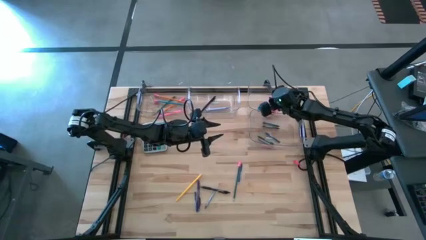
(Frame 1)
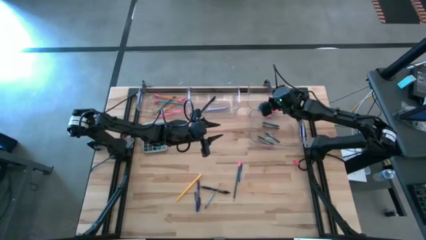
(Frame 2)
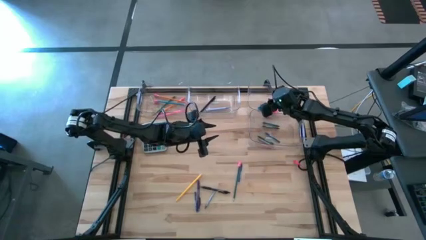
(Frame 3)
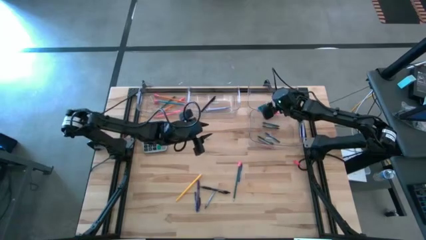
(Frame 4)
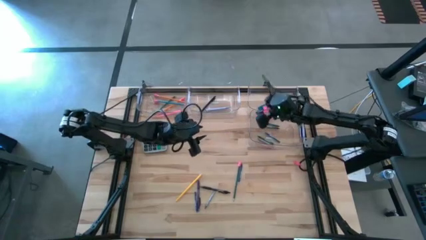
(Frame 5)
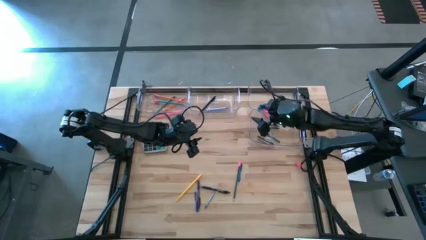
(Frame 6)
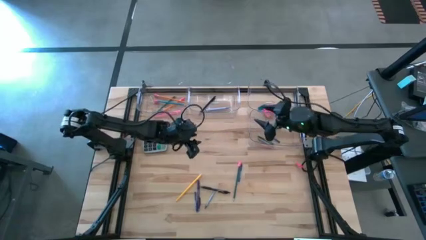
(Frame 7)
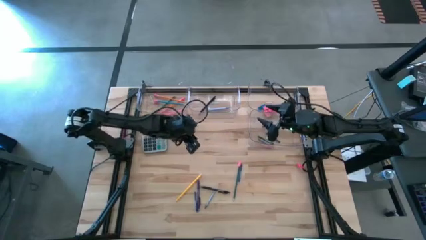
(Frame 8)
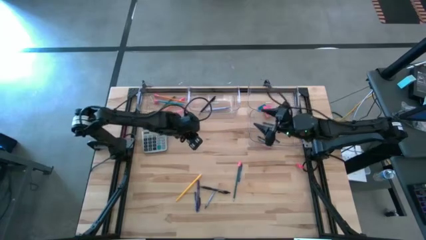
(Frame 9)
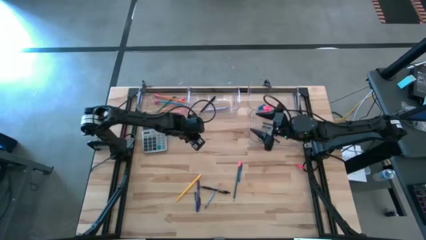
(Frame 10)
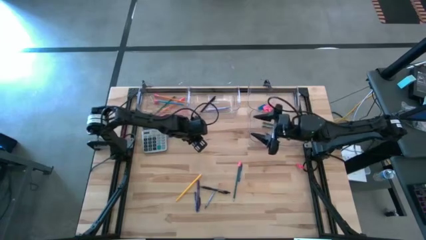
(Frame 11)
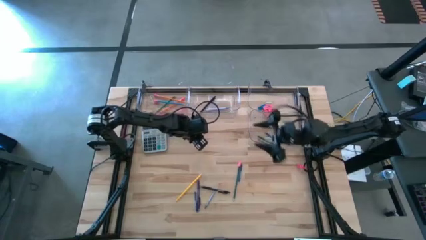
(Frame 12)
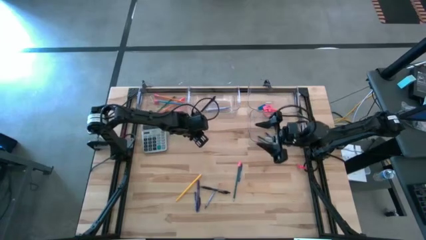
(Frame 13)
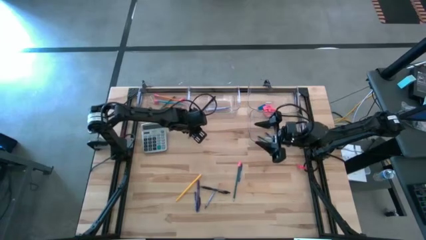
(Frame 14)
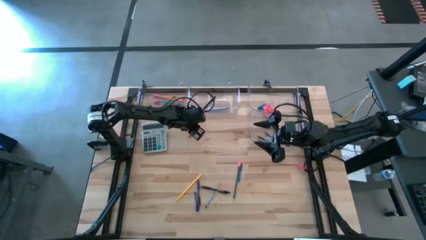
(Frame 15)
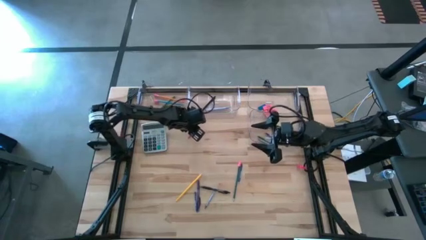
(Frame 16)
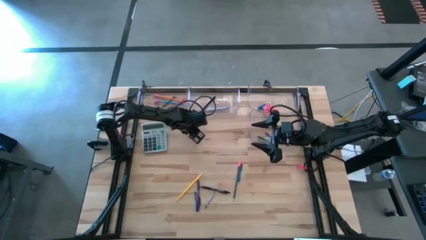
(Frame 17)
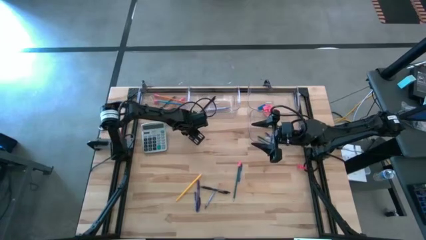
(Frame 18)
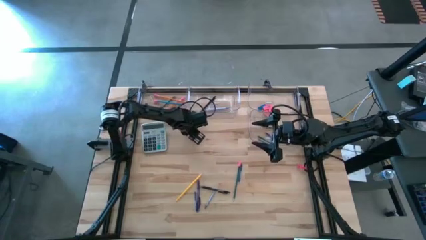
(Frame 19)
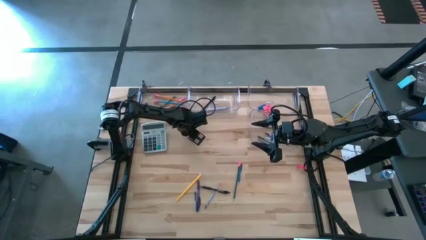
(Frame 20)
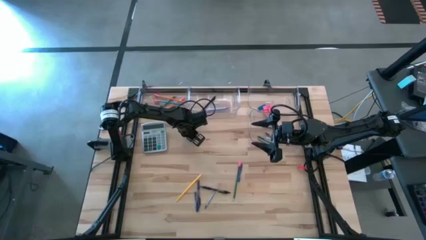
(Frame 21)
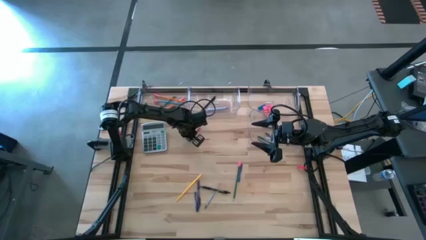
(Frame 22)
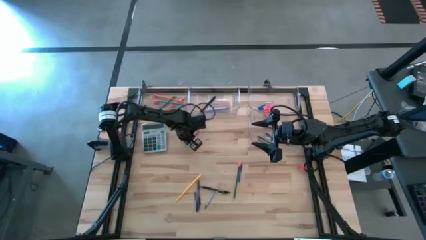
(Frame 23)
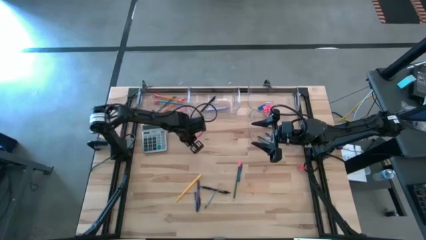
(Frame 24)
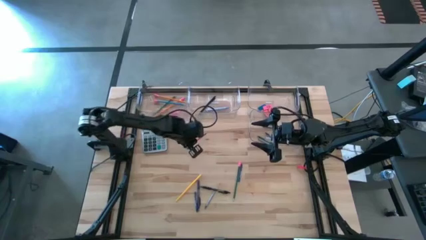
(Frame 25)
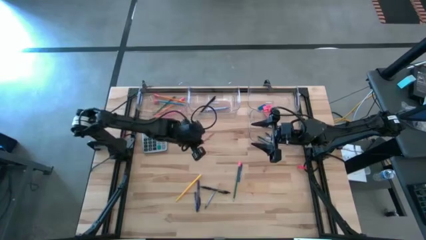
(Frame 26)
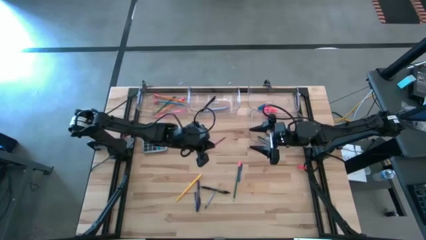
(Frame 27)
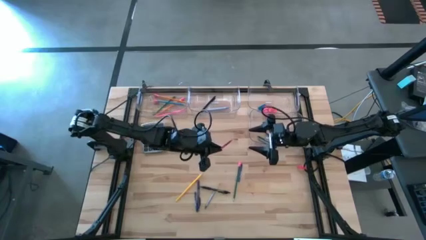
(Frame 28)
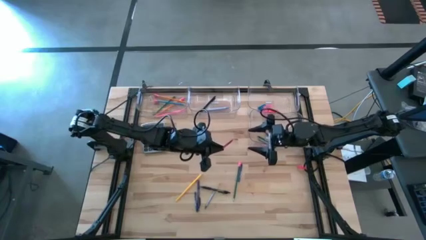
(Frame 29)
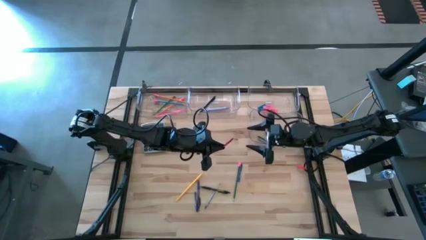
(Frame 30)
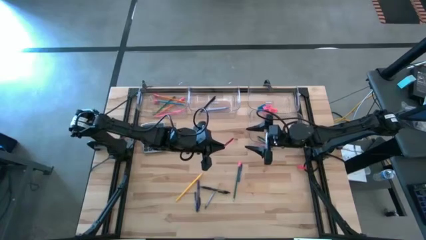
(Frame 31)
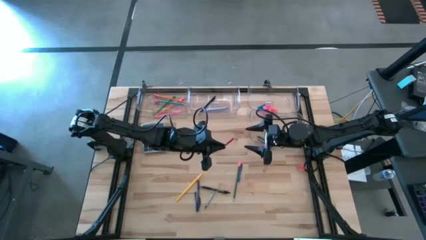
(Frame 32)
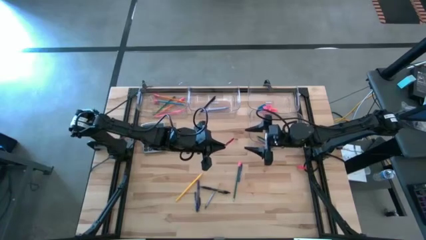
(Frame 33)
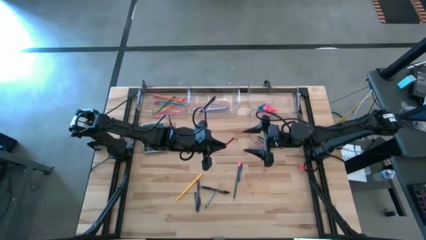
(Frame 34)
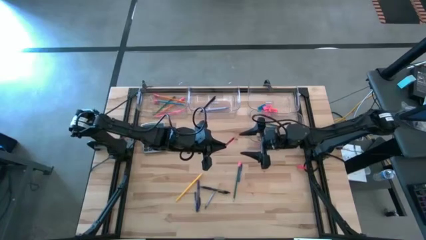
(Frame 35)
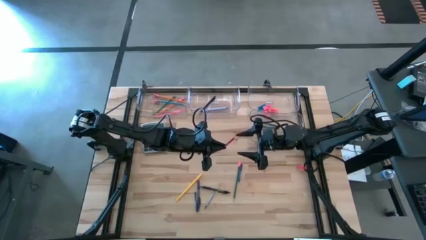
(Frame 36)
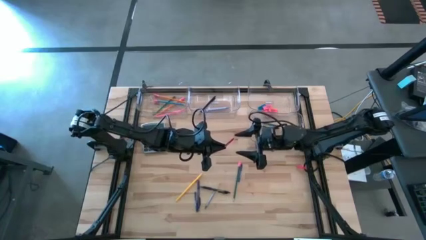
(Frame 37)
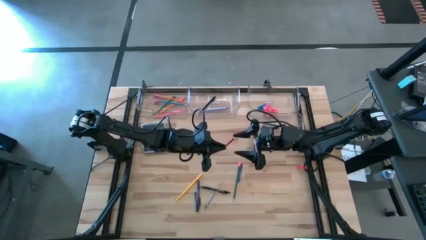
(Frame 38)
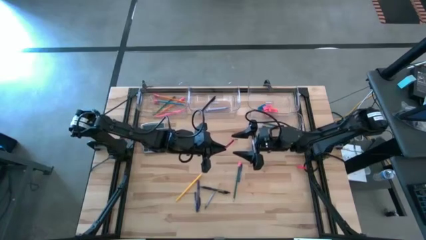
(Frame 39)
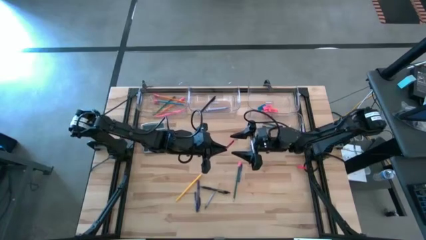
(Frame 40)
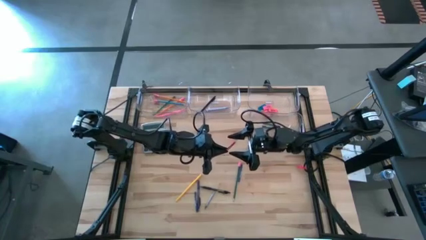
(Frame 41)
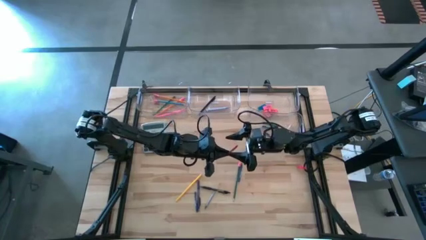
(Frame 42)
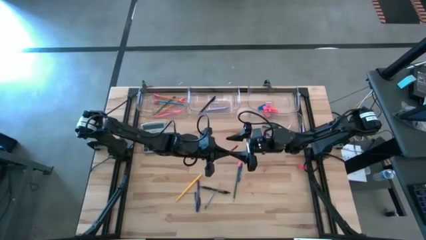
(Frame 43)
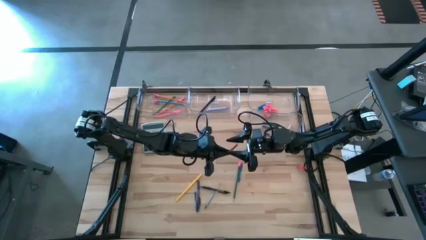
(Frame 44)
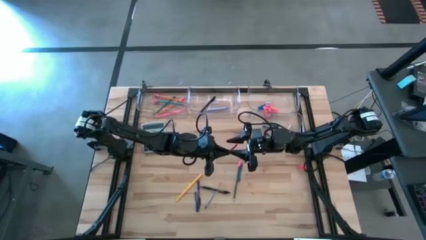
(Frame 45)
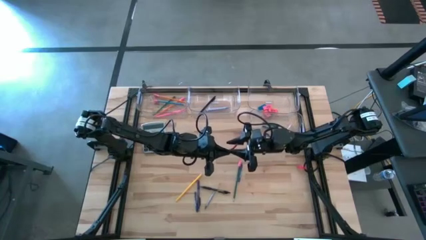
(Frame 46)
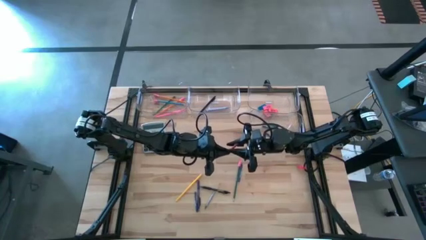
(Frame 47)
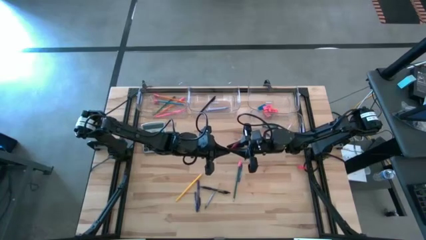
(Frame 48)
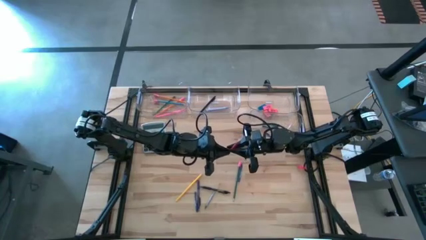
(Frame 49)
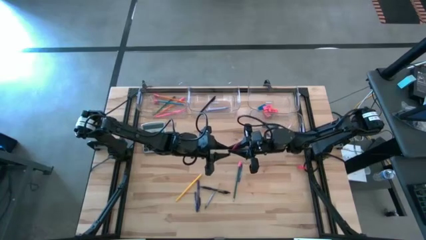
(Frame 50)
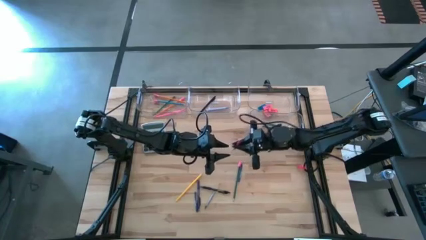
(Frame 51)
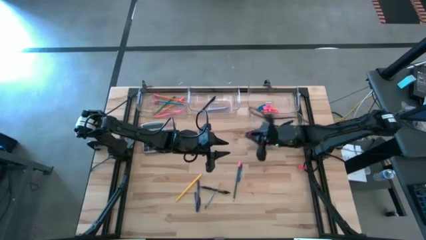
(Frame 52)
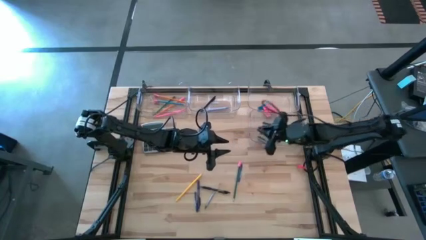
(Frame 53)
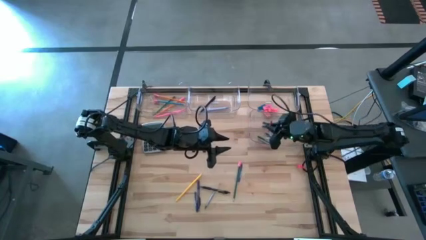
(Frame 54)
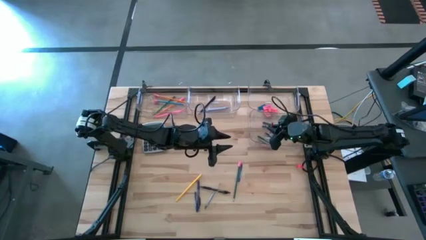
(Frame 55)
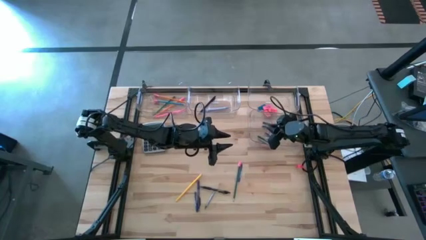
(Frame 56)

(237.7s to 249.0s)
Task: Sort crayons/erasers/pens/pencils in bins
Put the red crayon into the bottom transparent bin

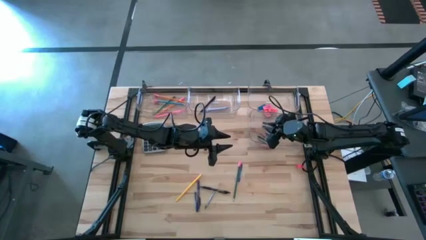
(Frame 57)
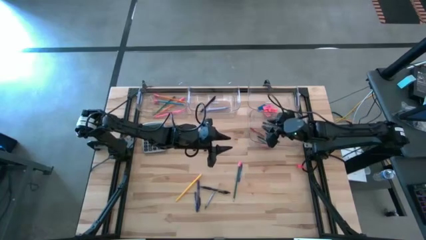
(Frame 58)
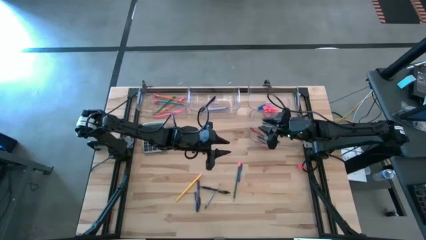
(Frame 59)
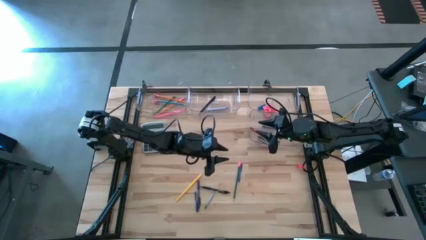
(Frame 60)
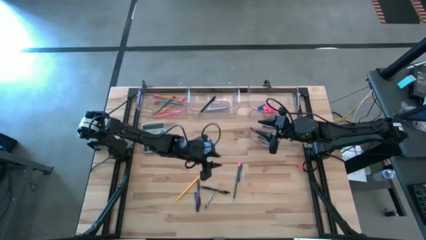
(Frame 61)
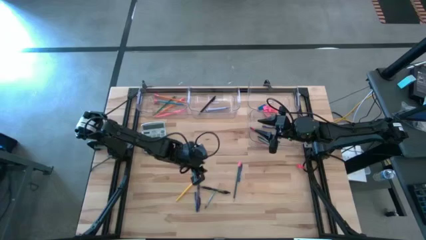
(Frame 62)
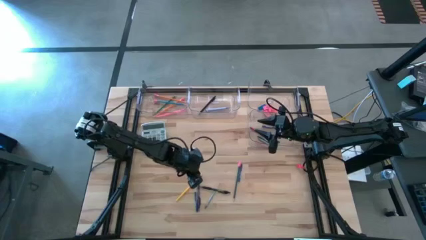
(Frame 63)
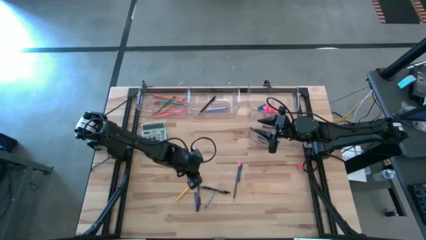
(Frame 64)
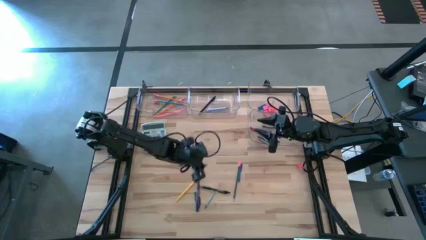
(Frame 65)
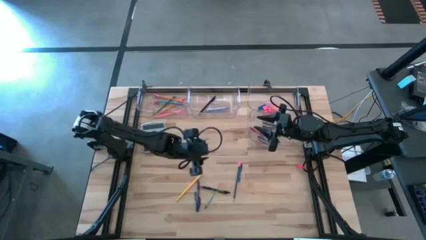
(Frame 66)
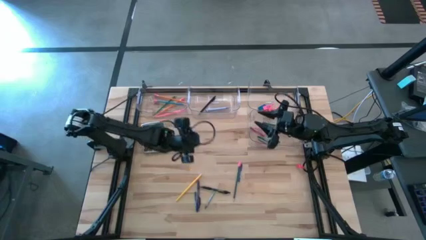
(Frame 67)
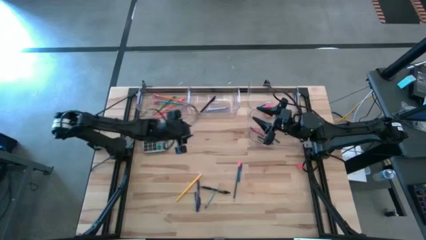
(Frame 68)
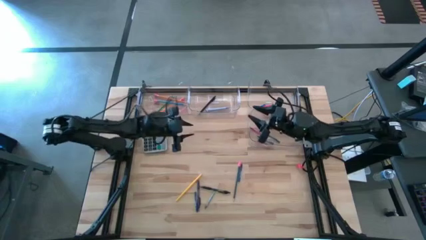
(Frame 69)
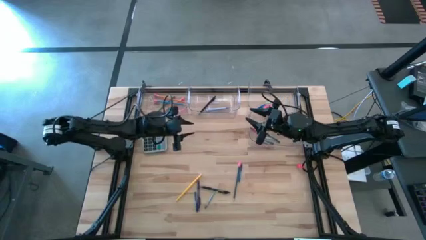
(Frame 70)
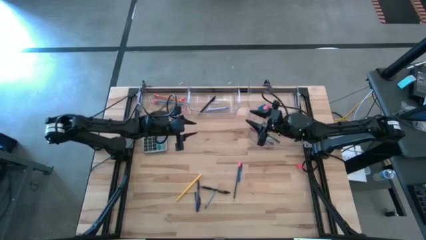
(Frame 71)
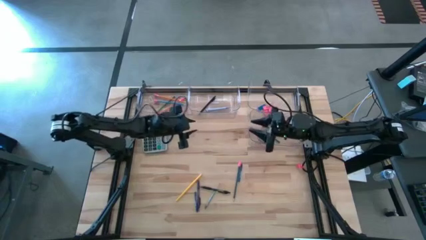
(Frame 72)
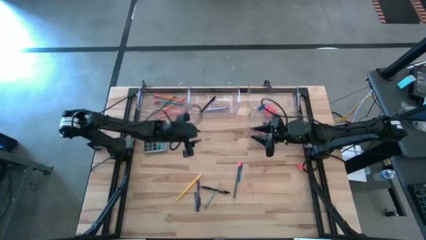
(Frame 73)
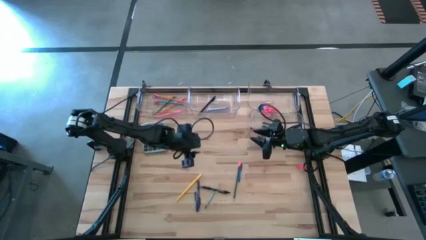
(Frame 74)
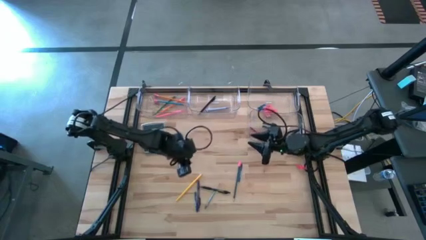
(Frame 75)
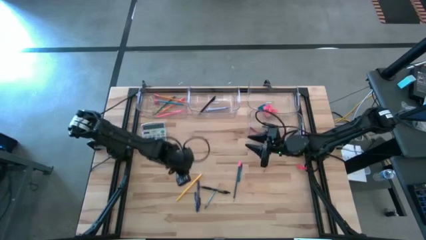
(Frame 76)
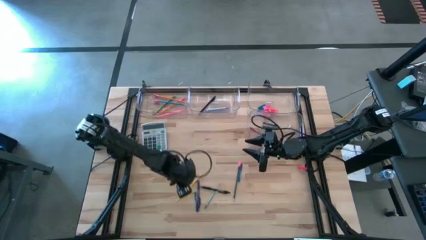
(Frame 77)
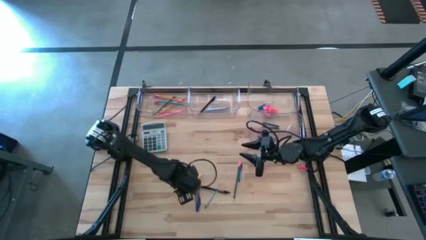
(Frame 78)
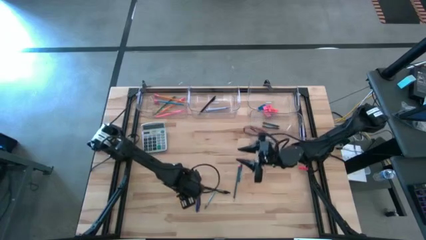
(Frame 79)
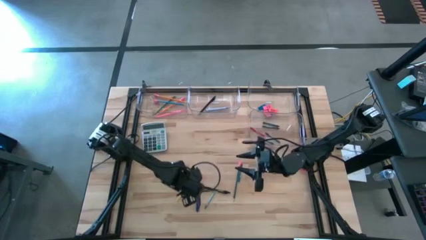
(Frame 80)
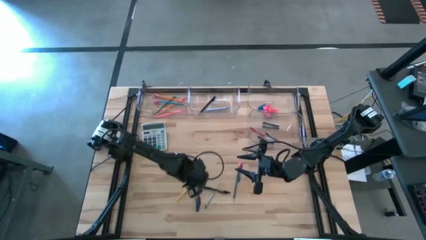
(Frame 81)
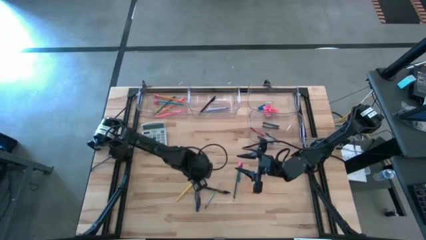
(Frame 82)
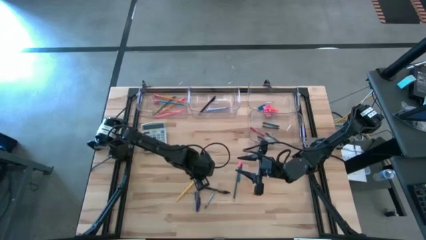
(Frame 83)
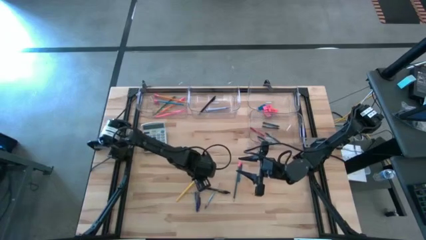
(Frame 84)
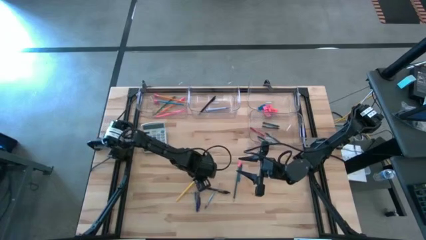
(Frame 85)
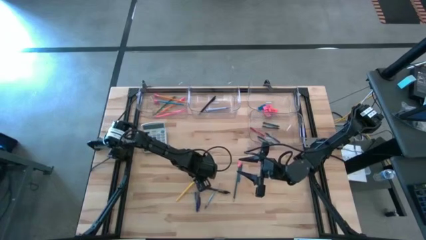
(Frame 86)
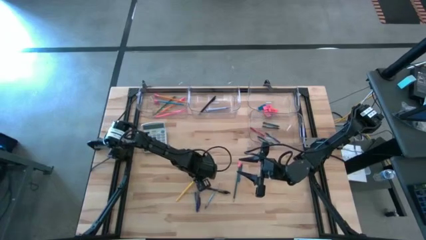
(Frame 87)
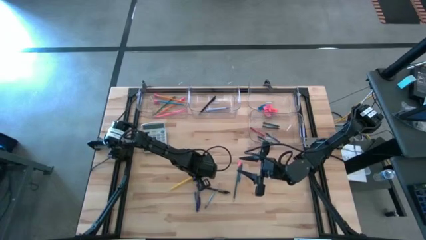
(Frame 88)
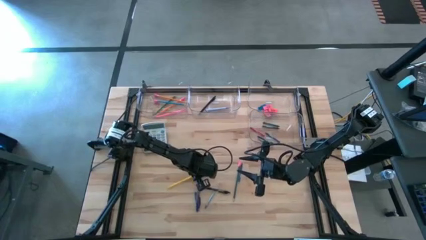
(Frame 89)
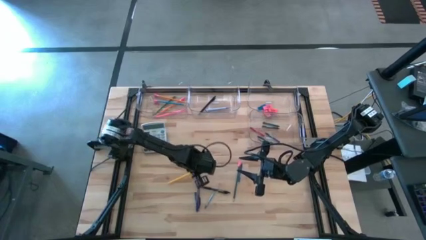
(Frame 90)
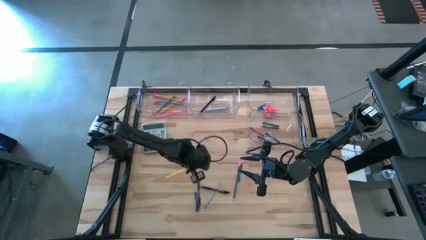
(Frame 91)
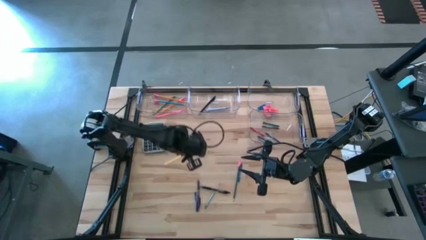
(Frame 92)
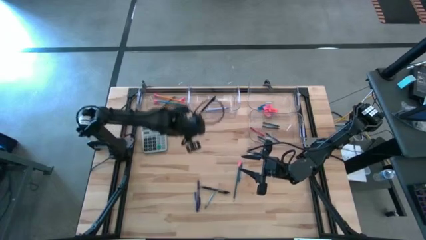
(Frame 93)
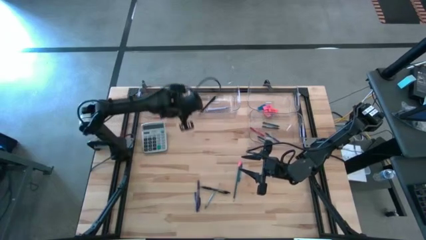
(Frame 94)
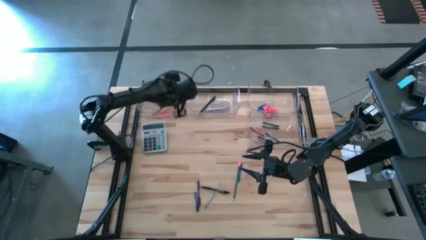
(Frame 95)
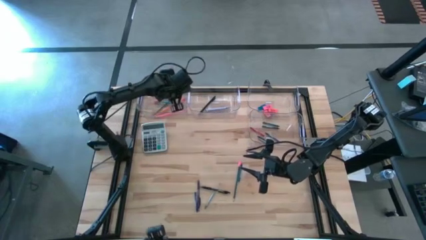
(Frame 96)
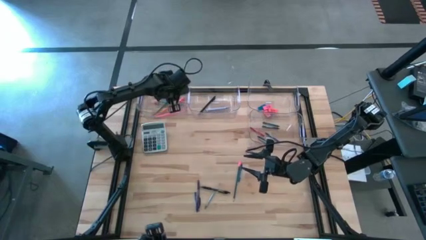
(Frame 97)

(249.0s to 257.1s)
Put the yellow pencil into the top left transparent bin
